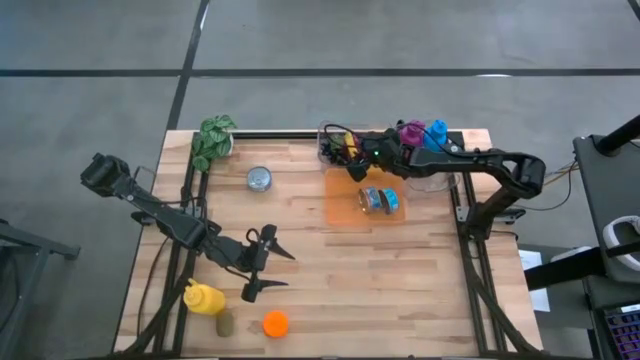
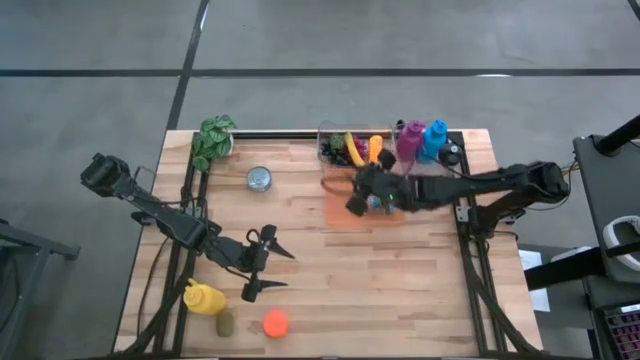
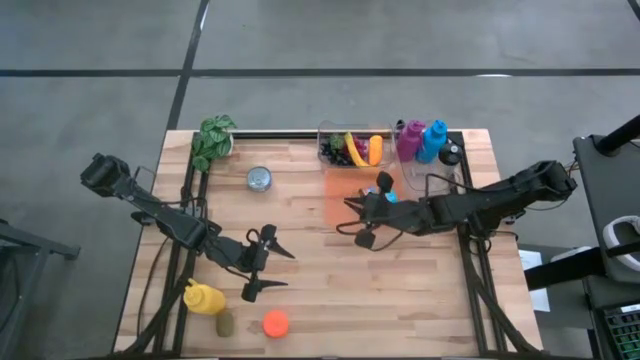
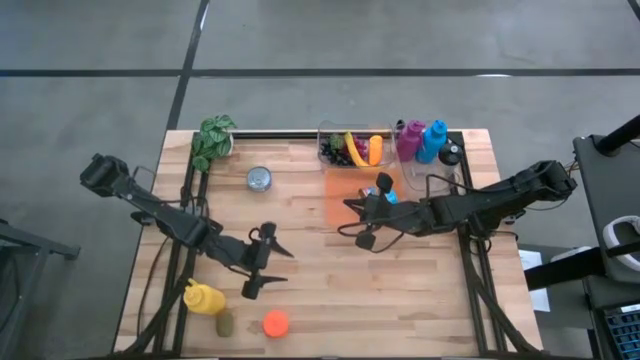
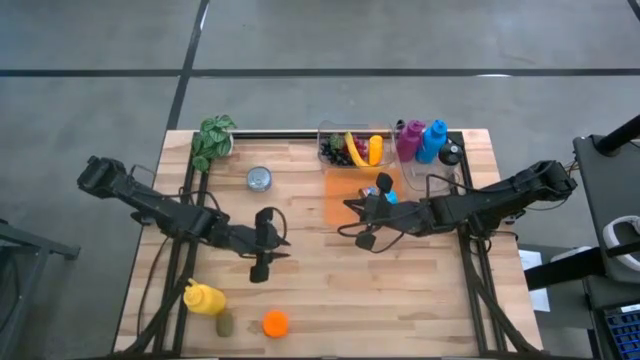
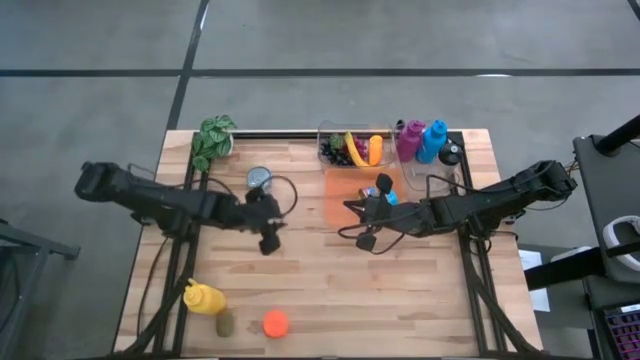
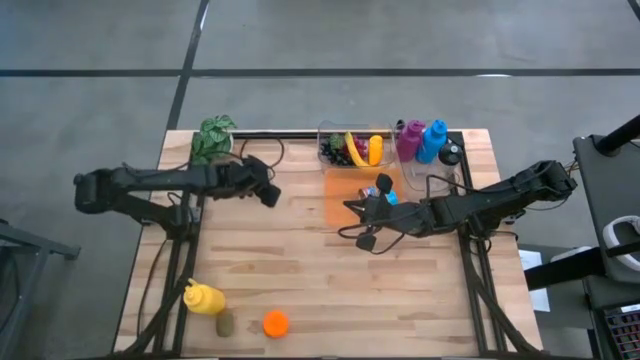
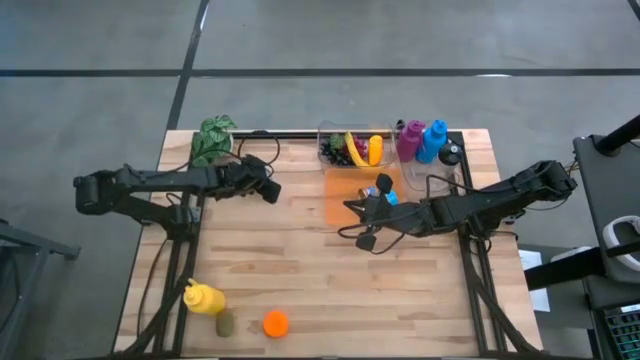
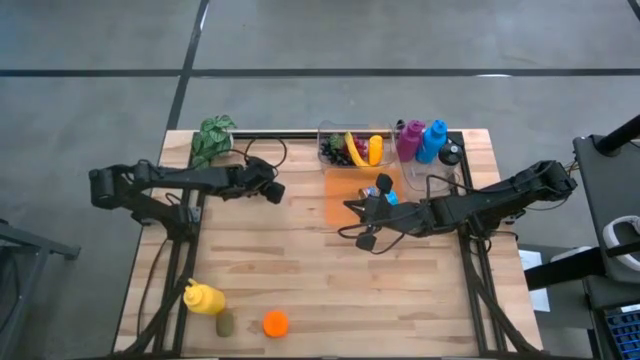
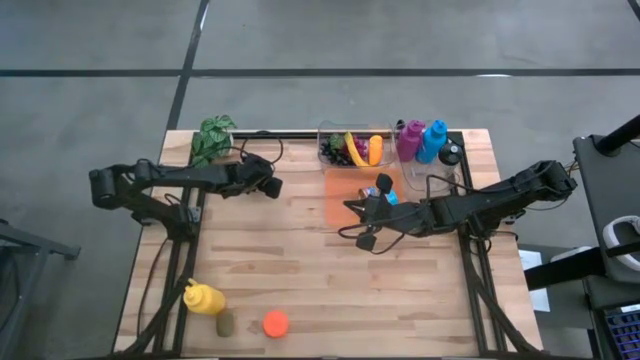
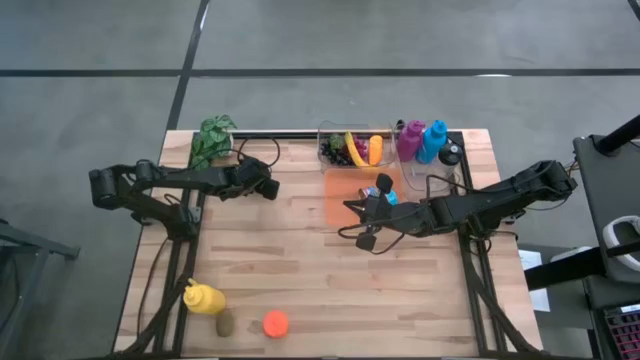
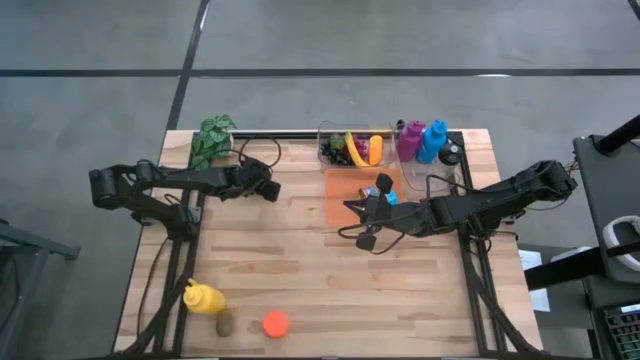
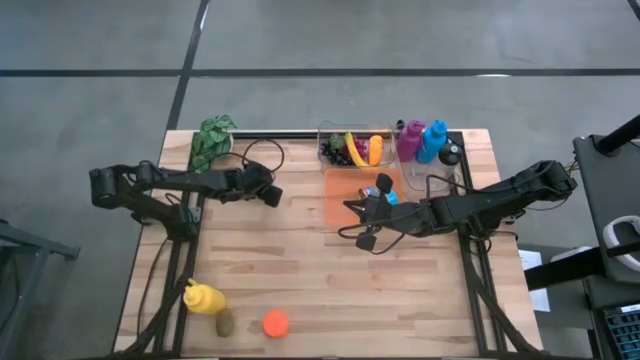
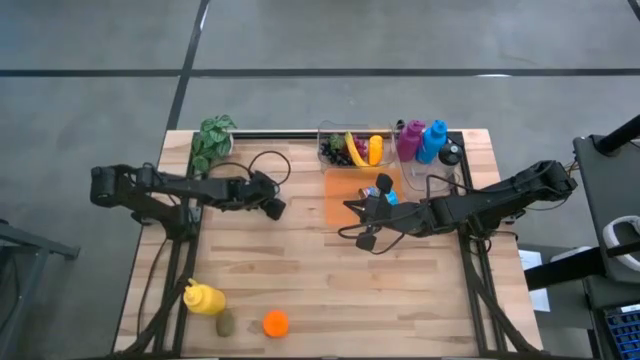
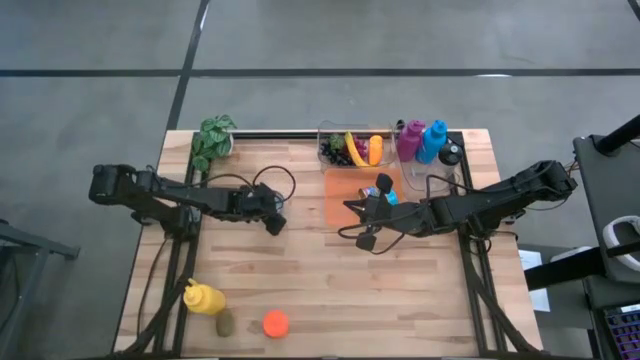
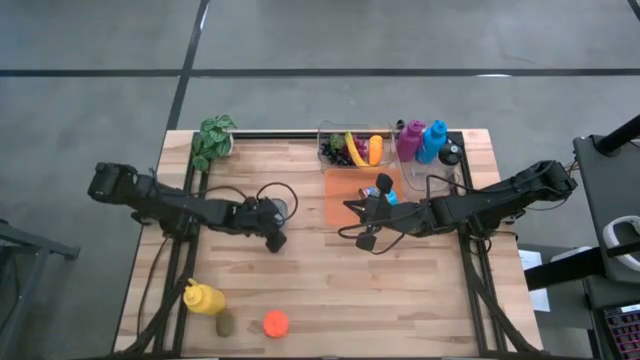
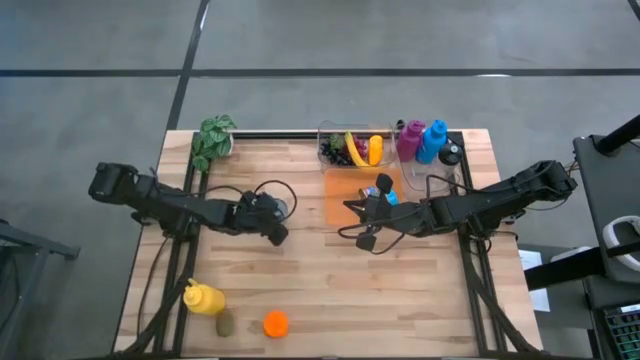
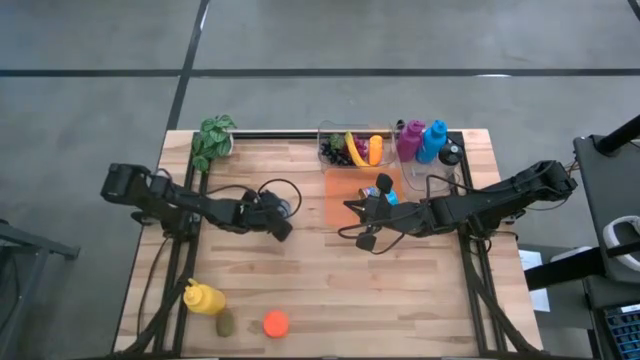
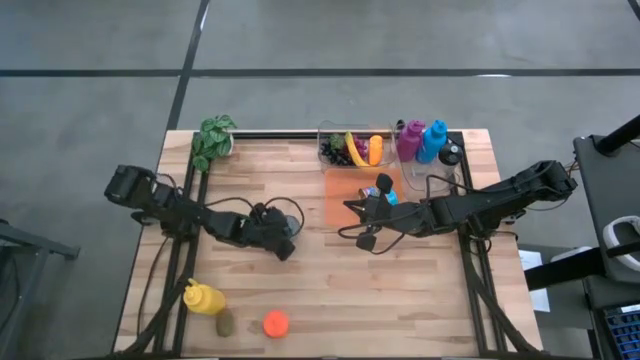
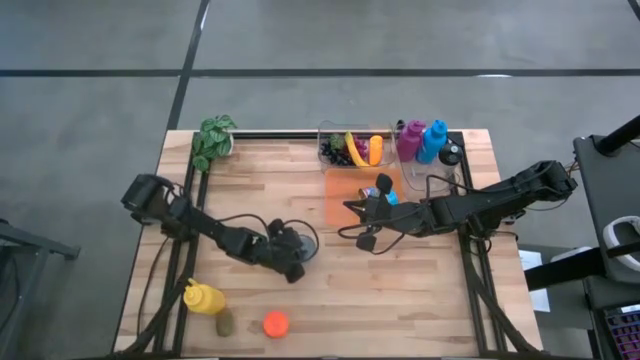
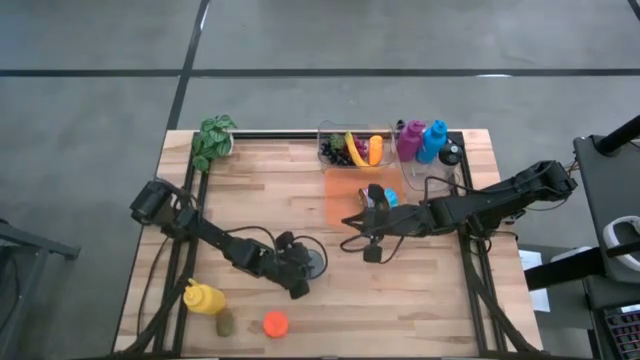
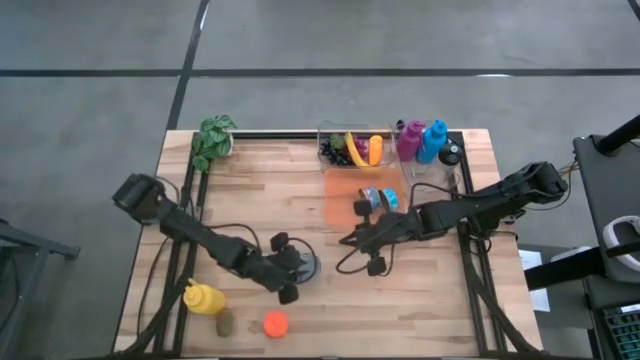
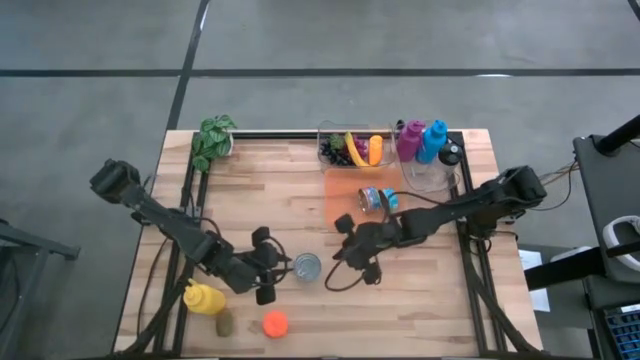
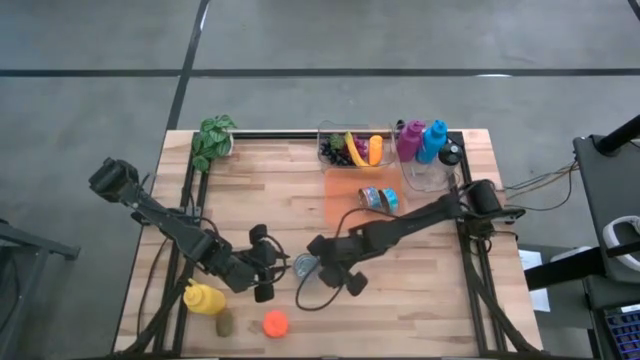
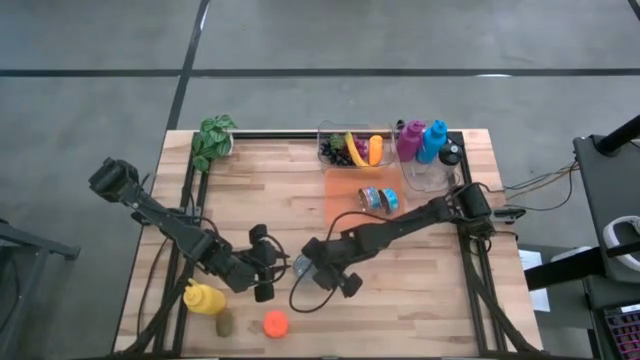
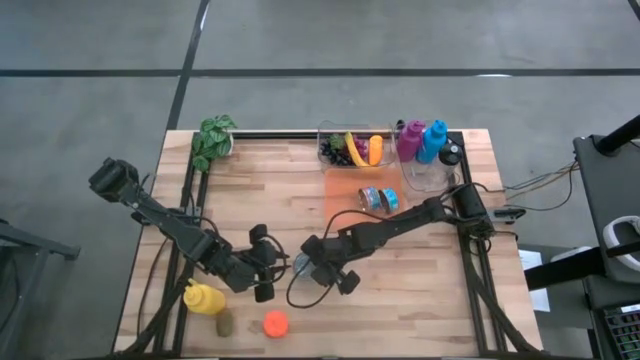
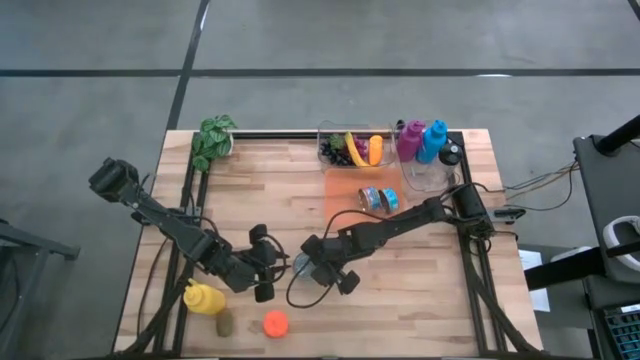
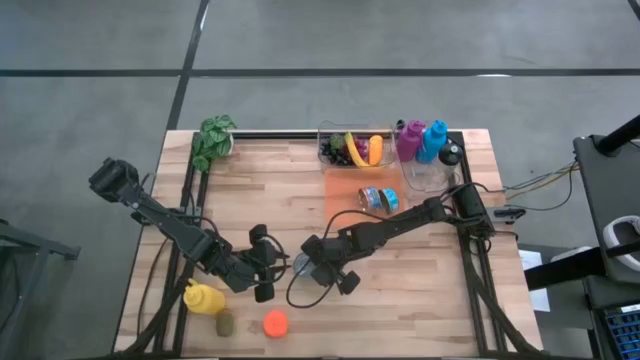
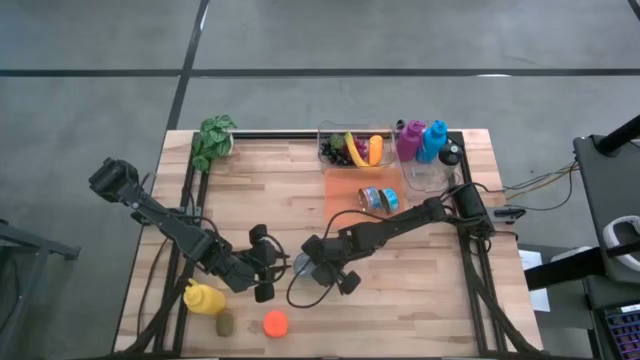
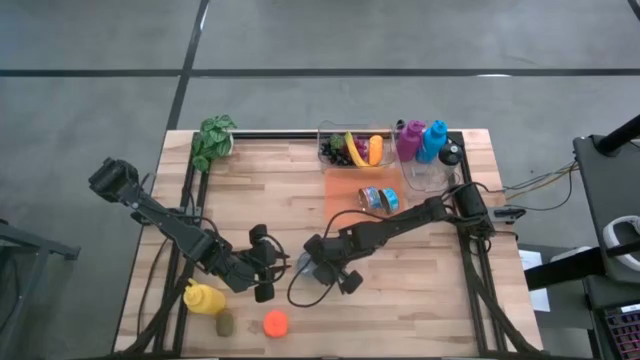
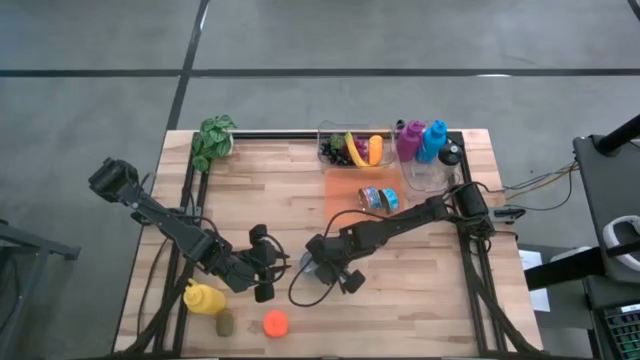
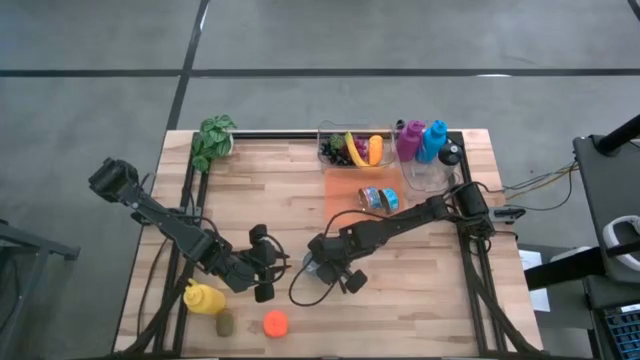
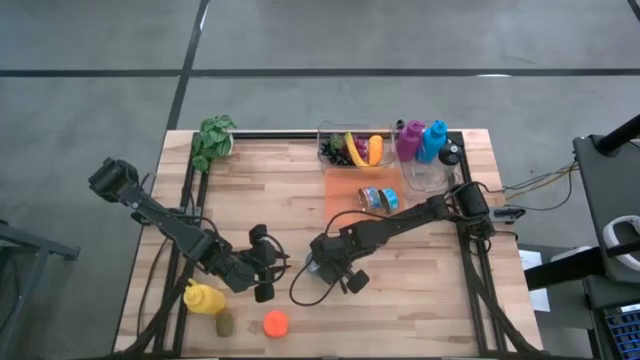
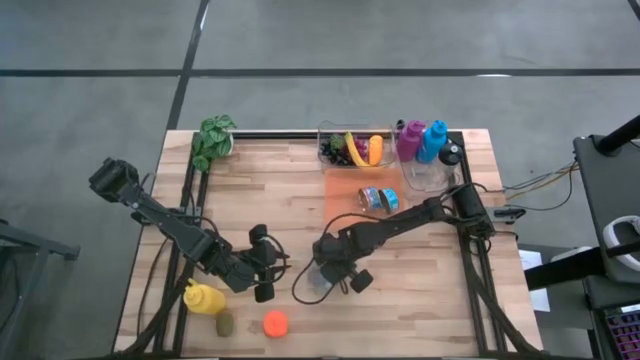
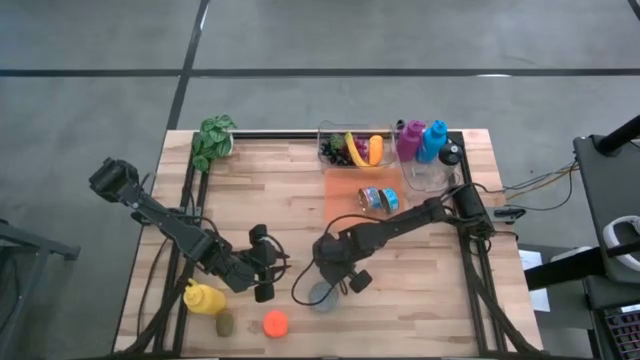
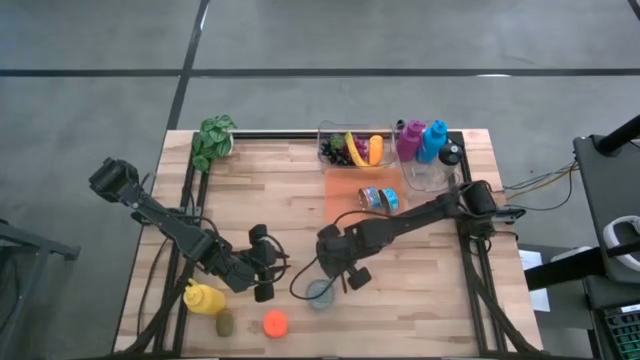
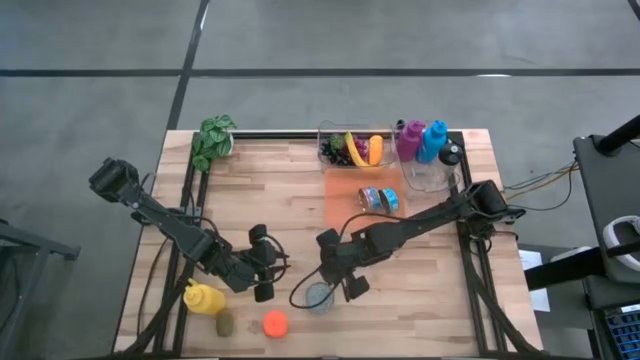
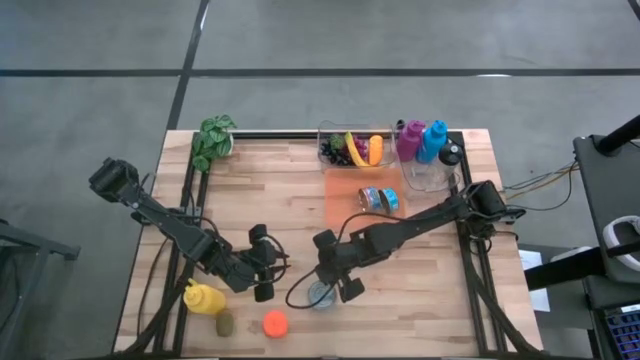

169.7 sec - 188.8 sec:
Task: Pick & Place Food Item
Put the blue tuna can into the orange bin

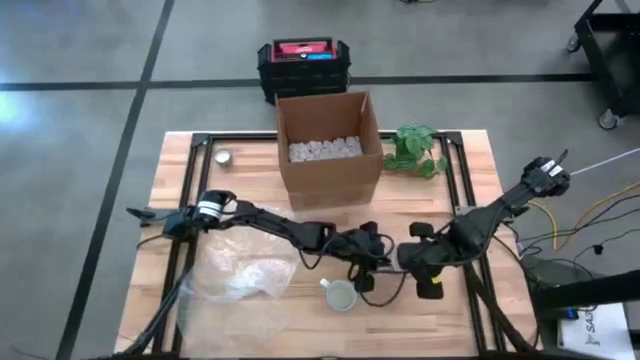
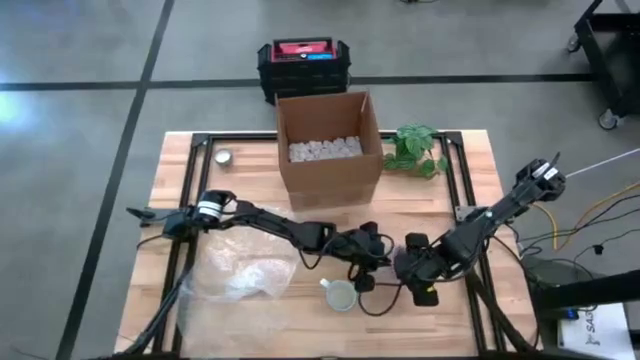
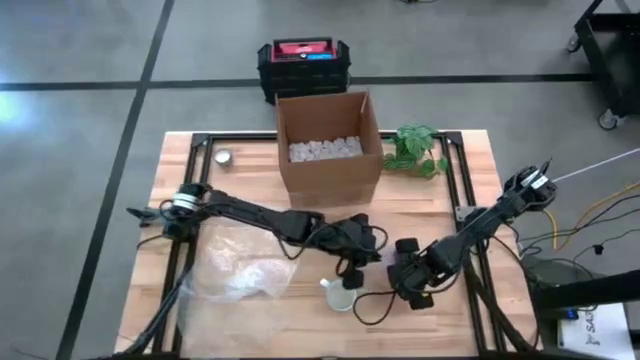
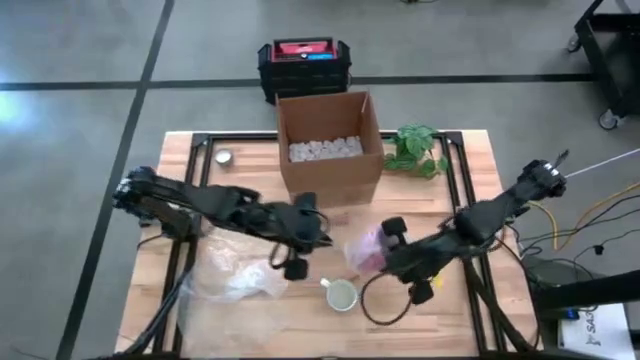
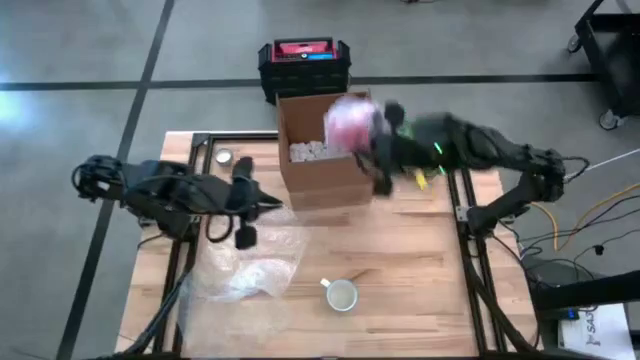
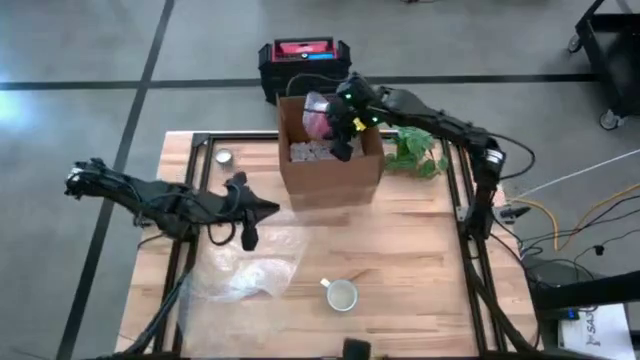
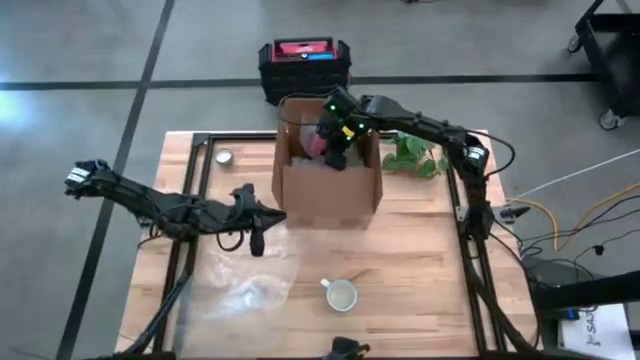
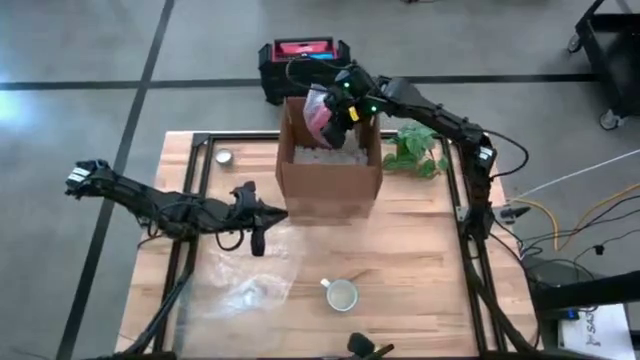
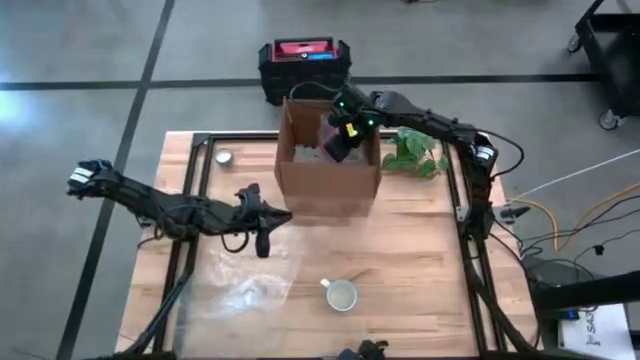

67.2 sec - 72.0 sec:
Task: wrap mug
Put the wrapped orange mug into the cardboard box
